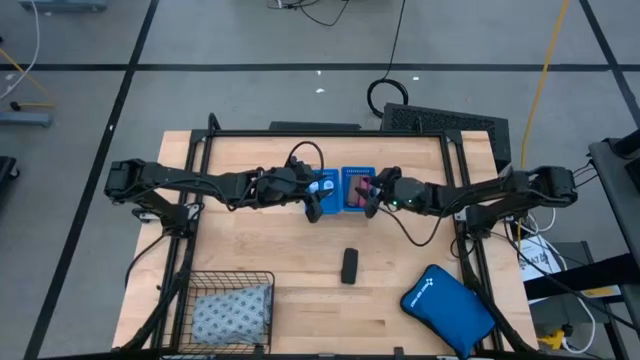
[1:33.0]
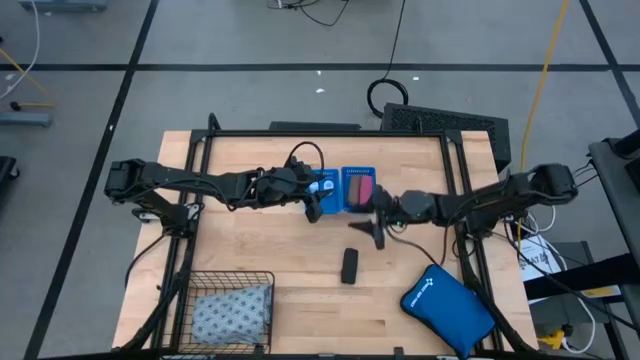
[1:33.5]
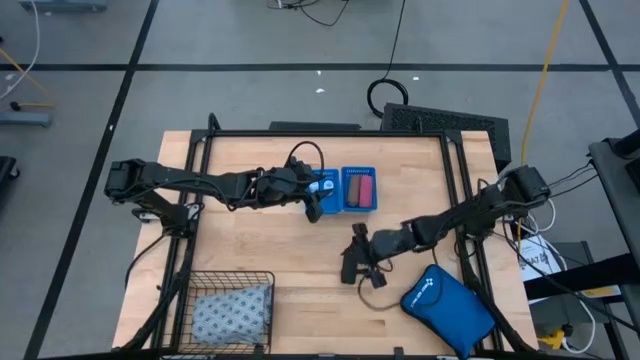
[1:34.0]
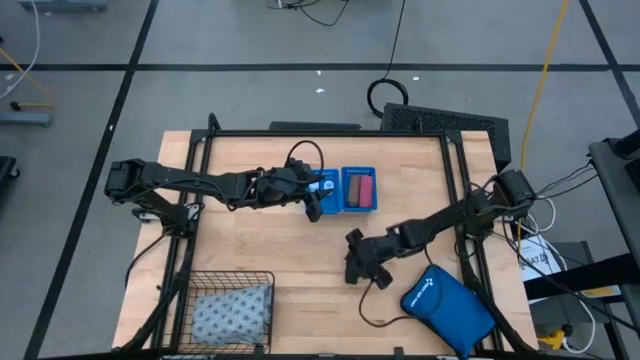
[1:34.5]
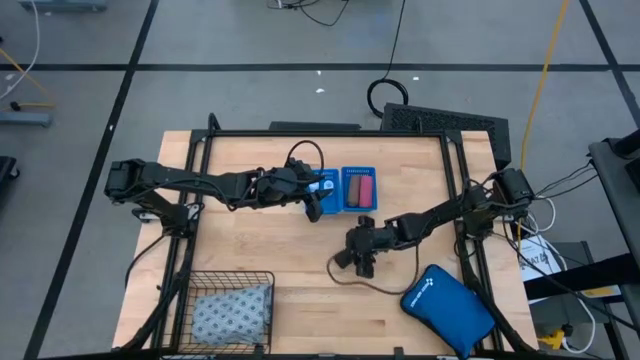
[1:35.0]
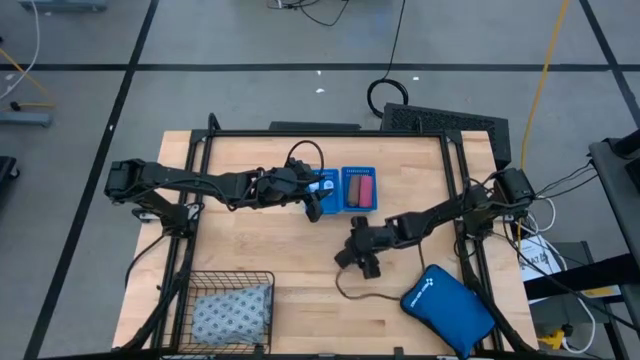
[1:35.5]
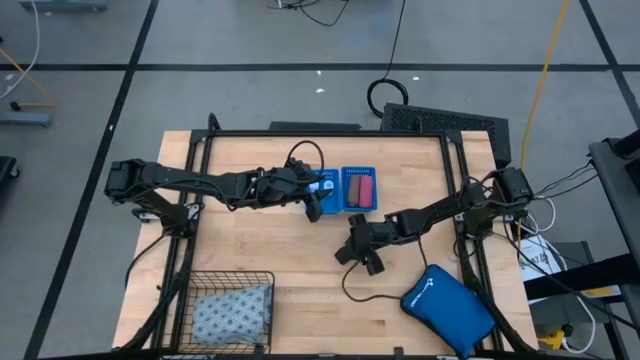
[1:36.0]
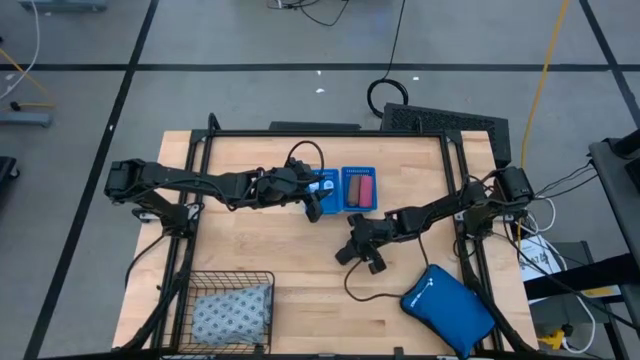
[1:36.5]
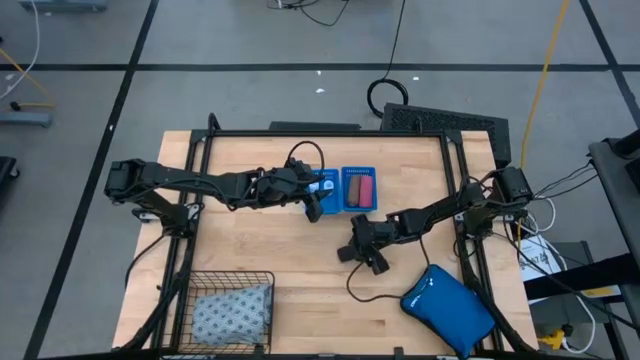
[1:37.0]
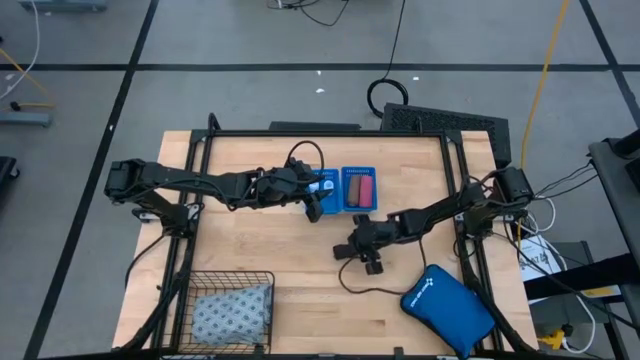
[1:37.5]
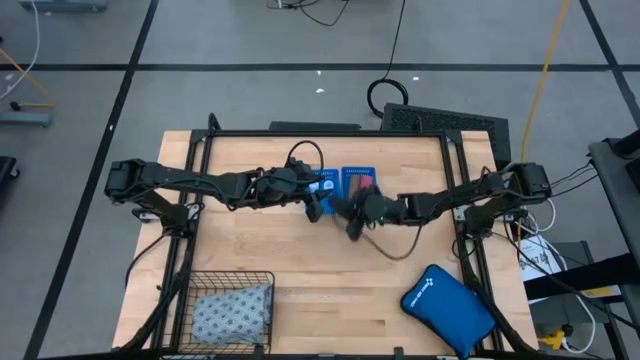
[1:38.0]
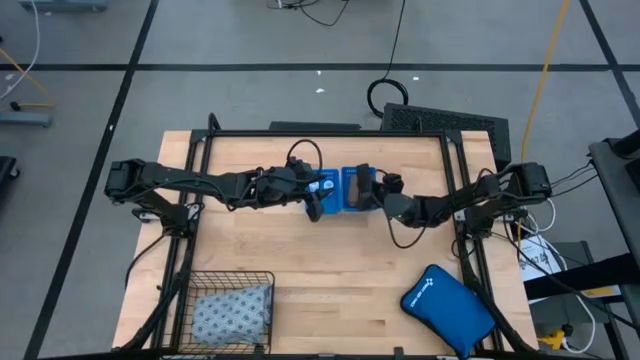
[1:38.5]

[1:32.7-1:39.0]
Task: Pick & place medical supplies in basket/bin
Put the black bandage into the right blue bin

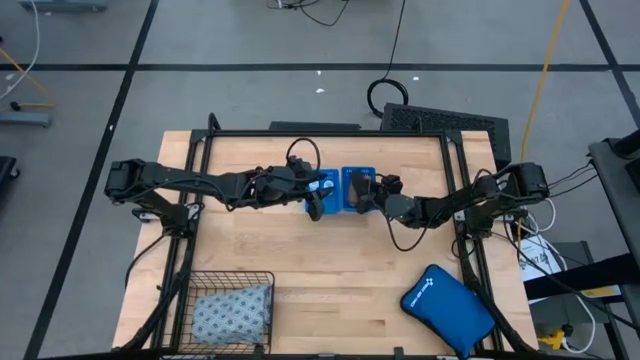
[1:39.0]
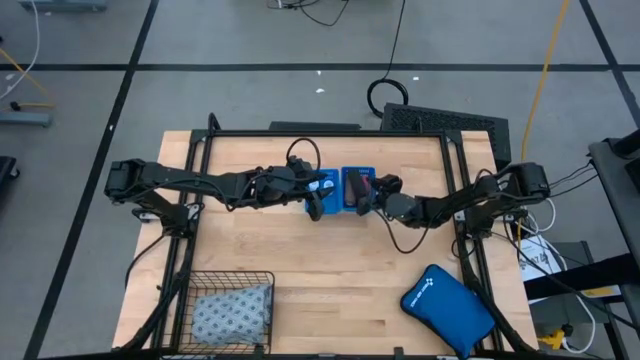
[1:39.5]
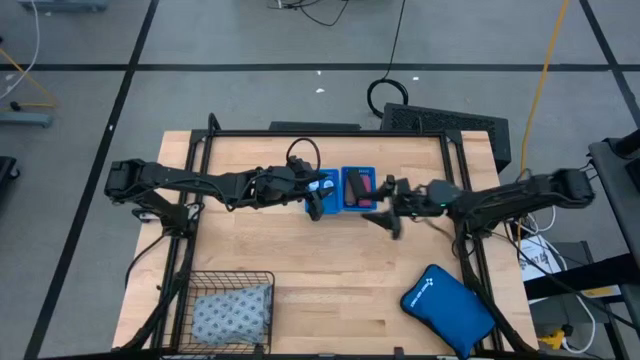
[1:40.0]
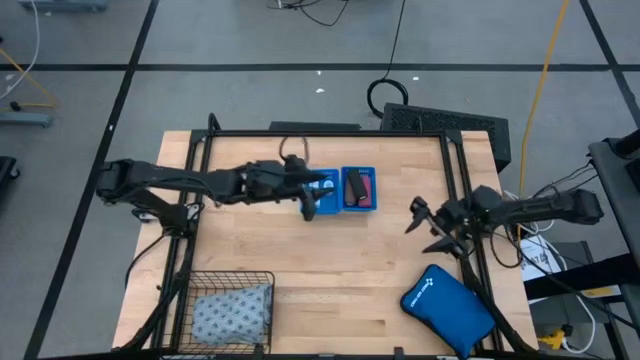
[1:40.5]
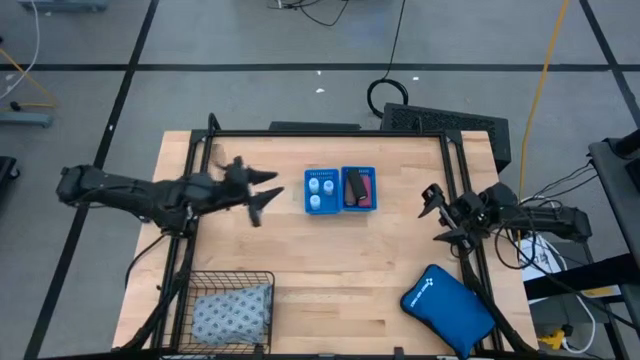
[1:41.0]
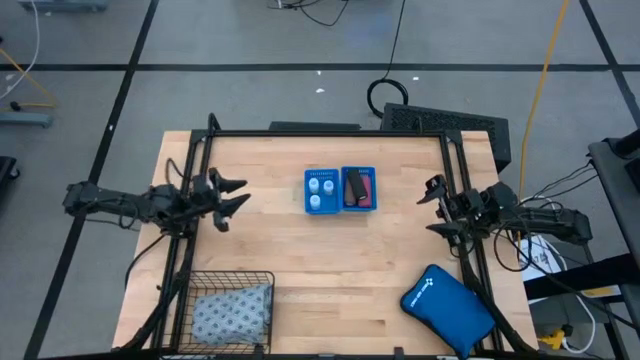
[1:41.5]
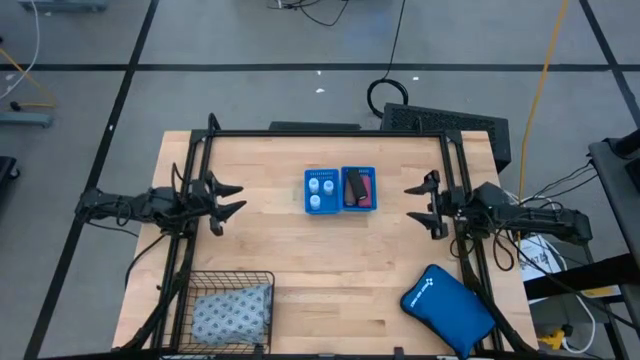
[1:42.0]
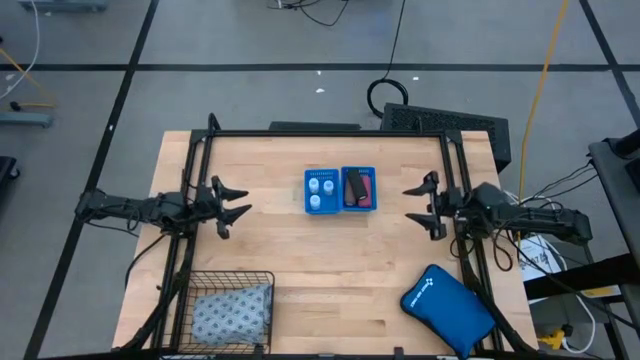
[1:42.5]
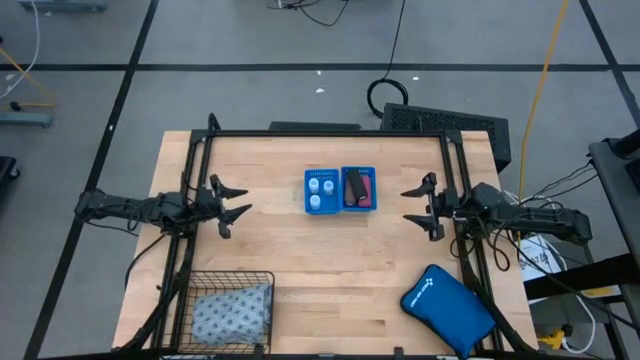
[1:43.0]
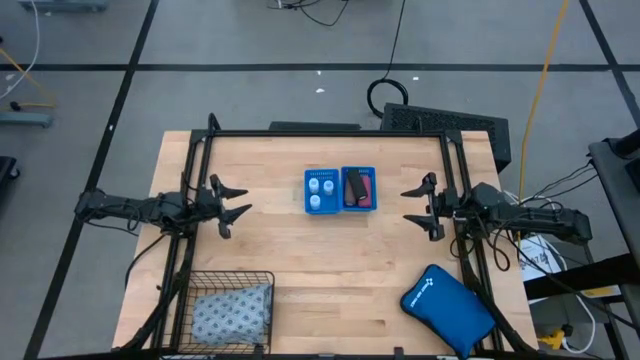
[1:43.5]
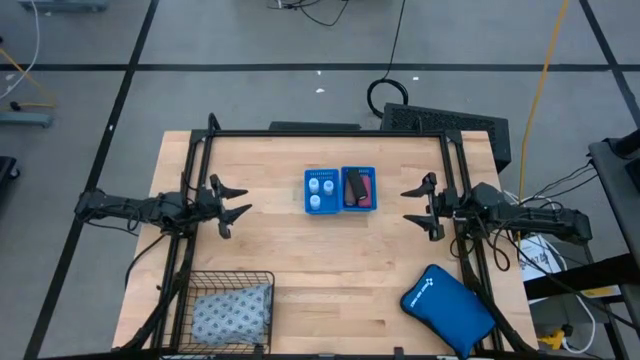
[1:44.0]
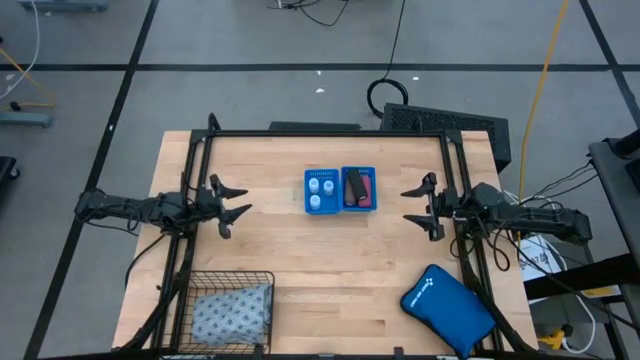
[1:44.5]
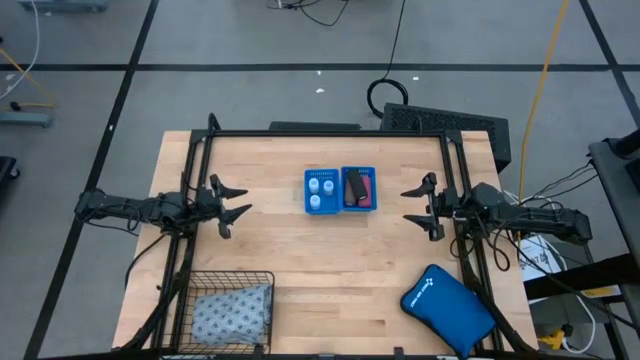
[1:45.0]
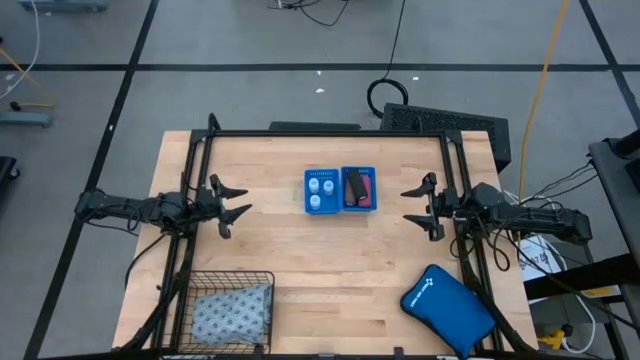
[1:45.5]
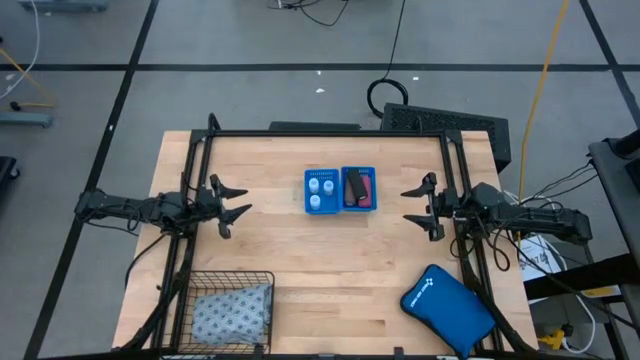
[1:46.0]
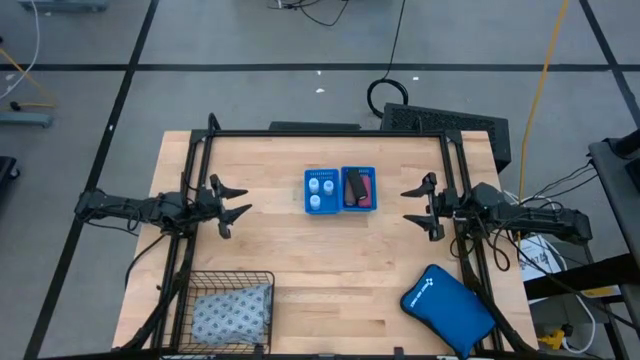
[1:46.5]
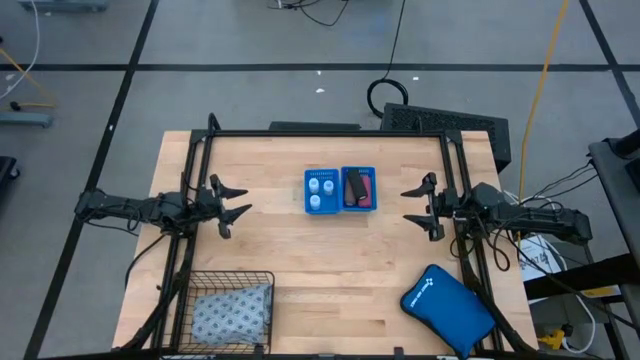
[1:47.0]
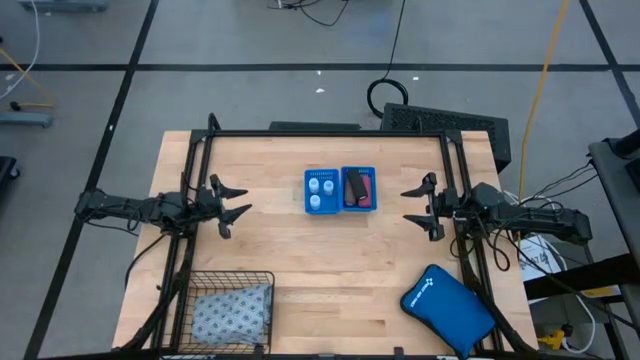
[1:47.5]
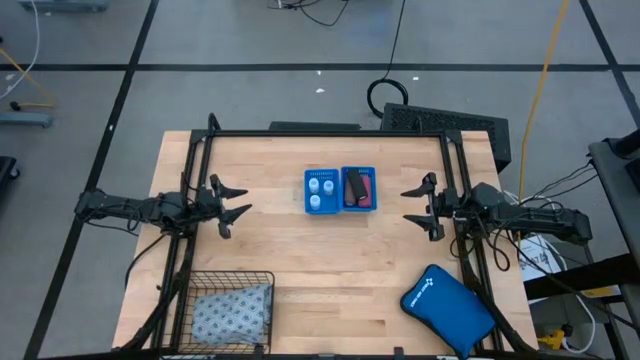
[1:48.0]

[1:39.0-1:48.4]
Return to Home Position

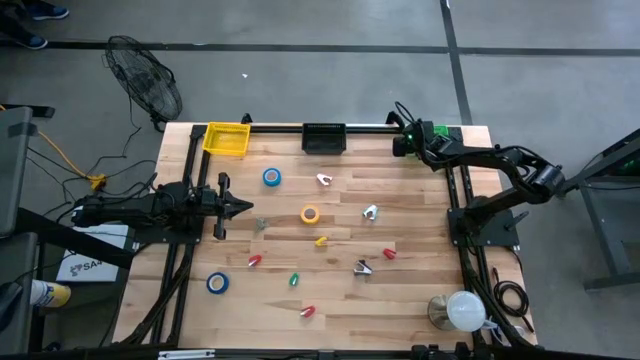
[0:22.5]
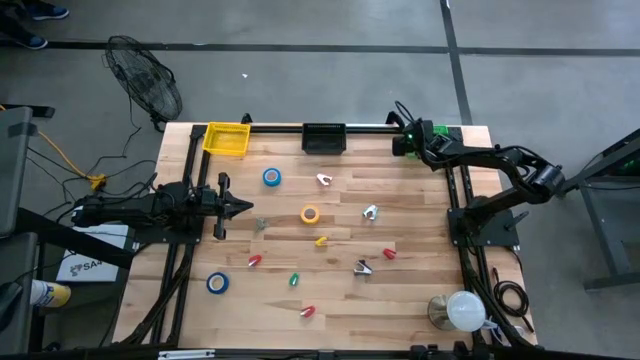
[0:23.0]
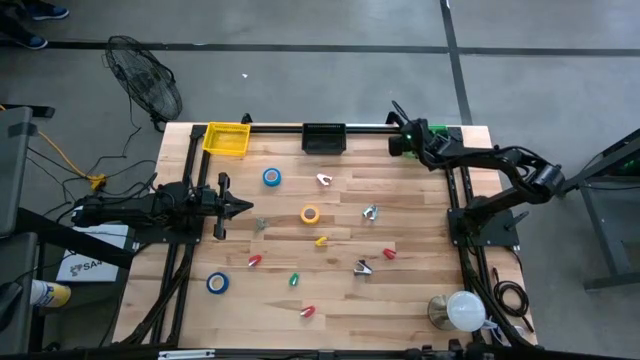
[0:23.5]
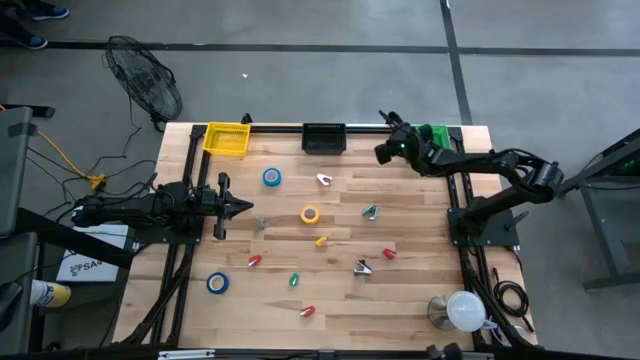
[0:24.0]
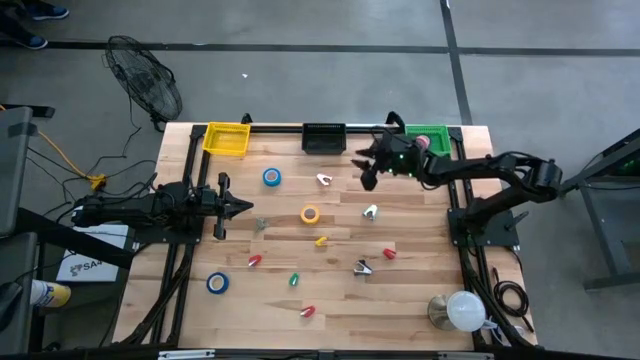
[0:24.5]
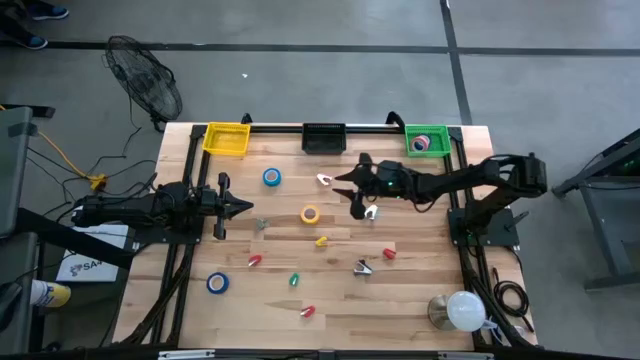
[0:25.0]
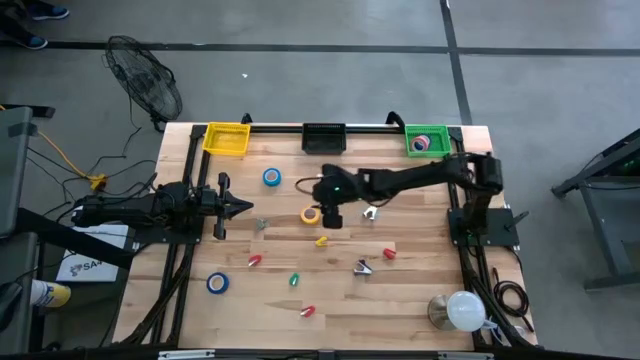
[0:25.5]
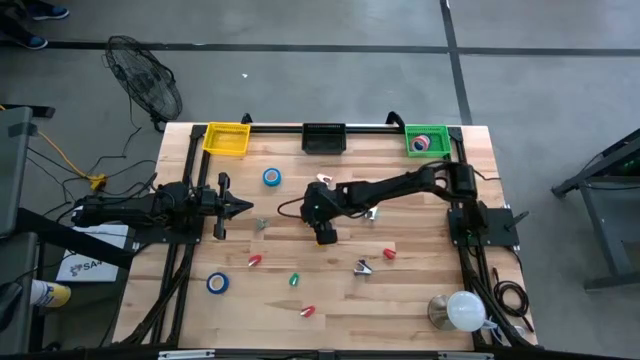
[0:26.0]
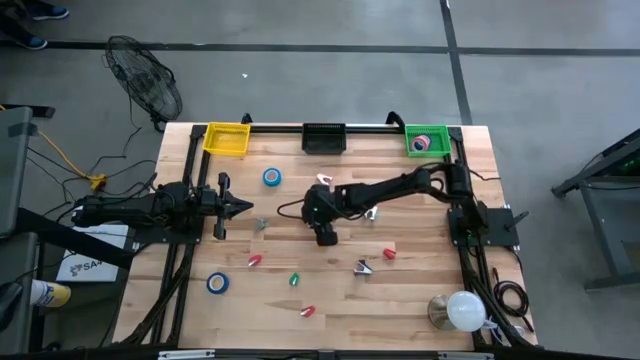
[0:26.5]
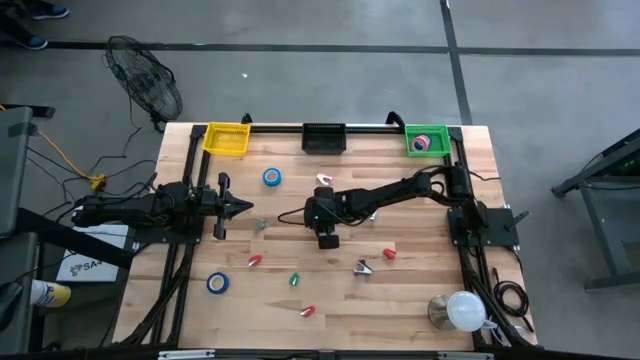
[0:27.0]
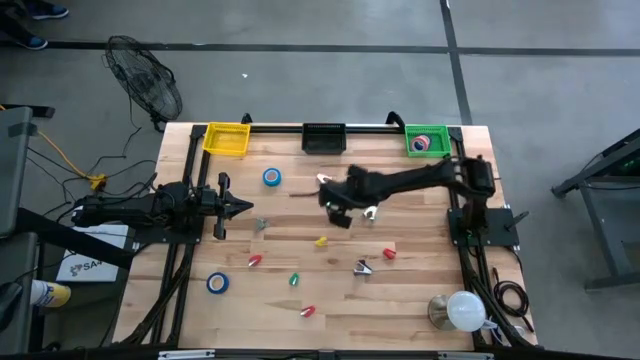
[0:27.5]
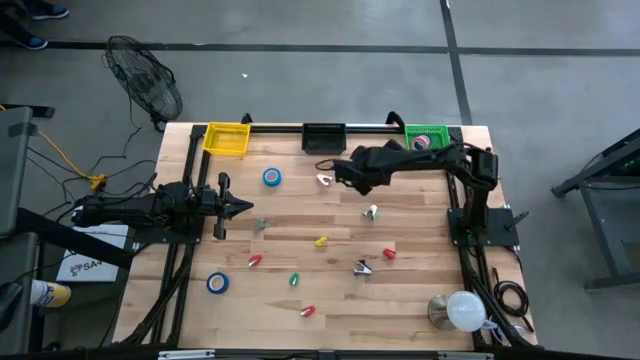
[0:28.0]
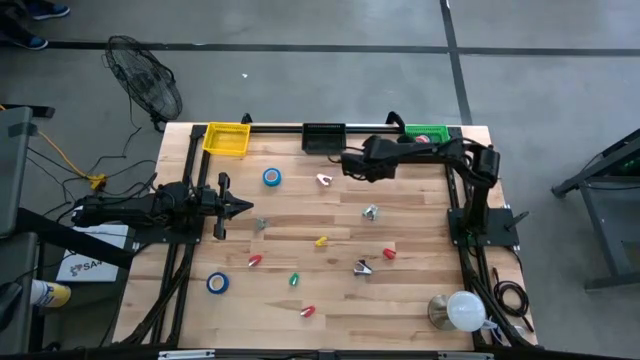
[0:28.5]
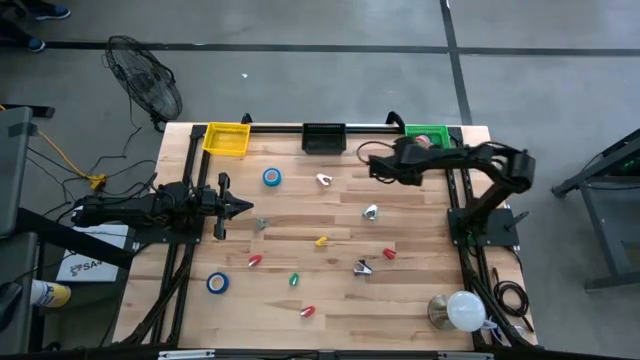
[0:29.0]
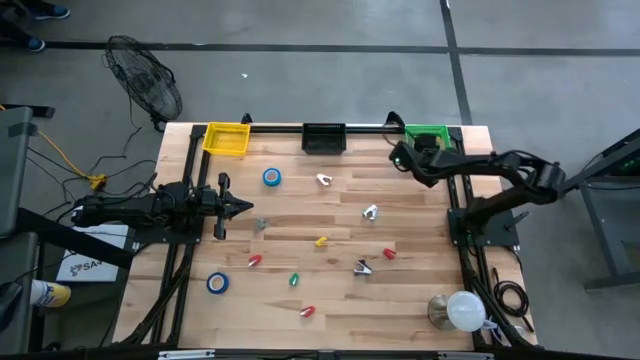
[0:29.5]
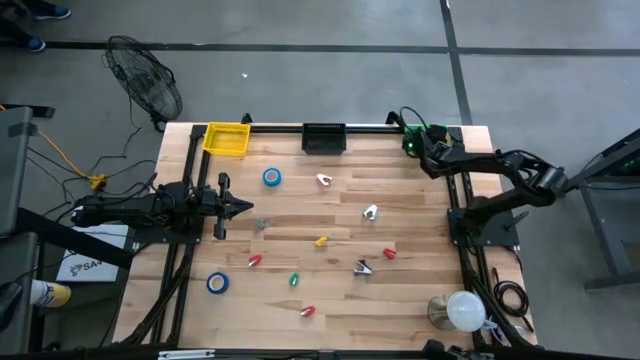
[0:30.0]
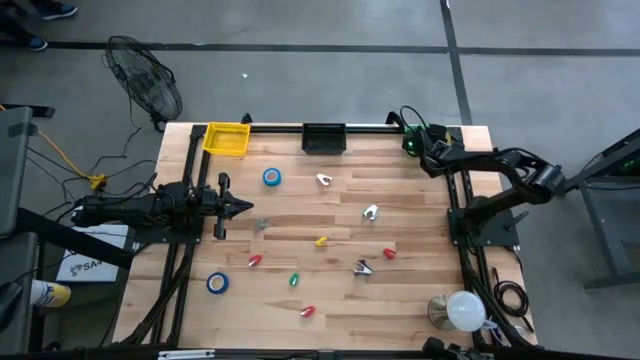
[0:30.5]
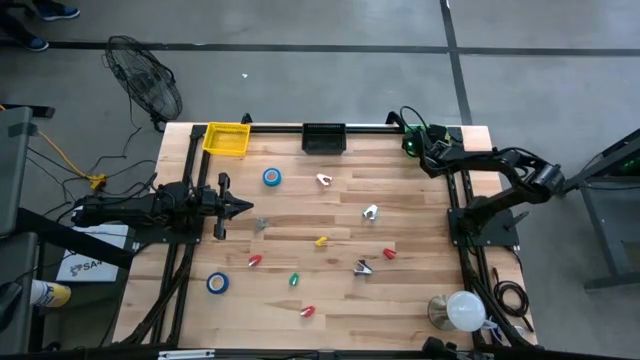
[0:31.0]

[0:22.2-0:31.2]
Task: Pick and place Stapler, Stapler remover, tape
Put the yellow tape into the green bin
